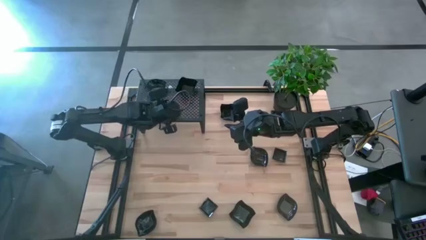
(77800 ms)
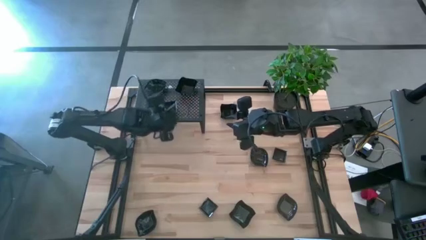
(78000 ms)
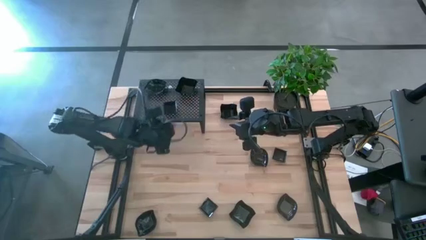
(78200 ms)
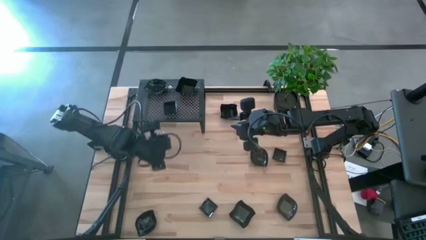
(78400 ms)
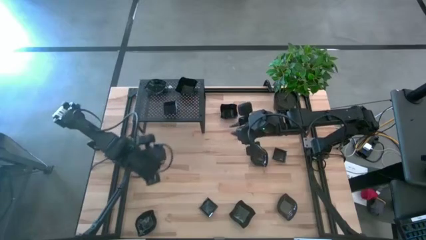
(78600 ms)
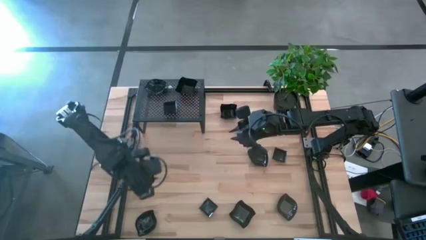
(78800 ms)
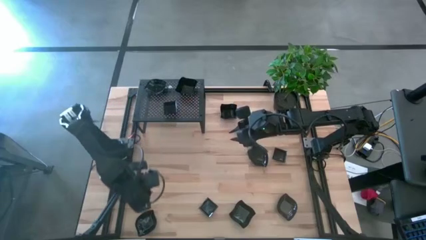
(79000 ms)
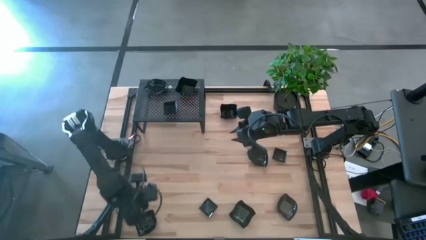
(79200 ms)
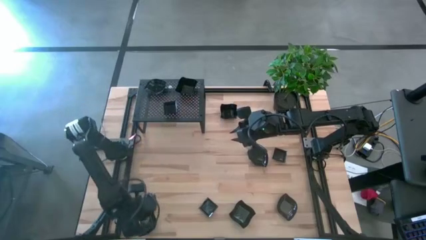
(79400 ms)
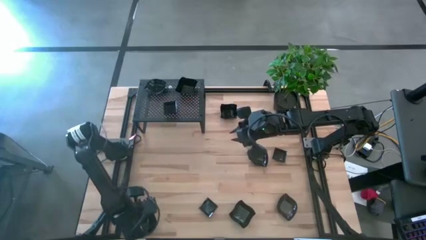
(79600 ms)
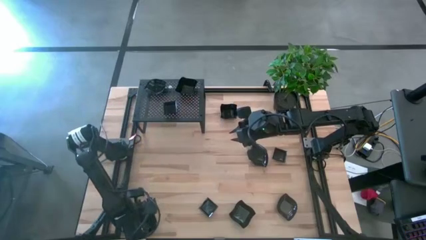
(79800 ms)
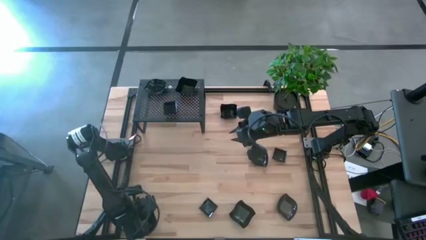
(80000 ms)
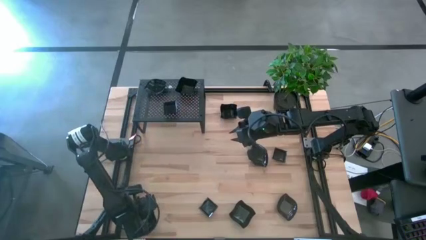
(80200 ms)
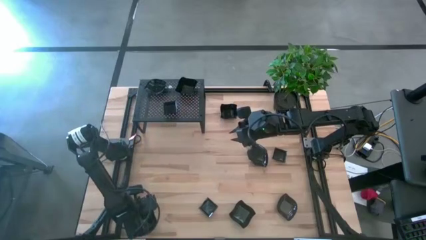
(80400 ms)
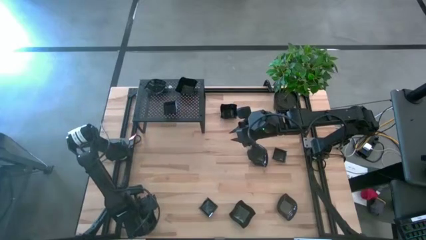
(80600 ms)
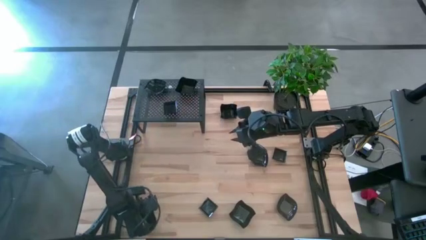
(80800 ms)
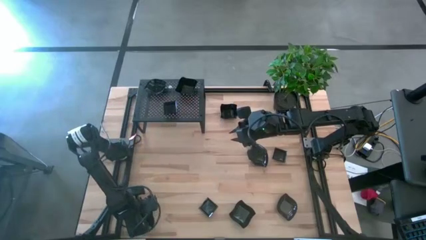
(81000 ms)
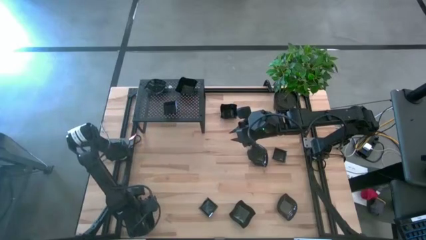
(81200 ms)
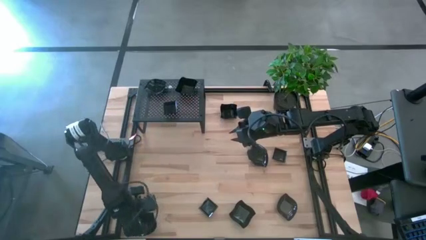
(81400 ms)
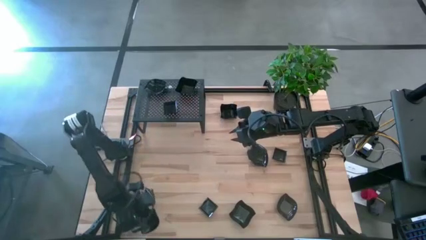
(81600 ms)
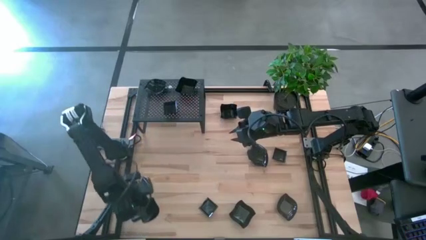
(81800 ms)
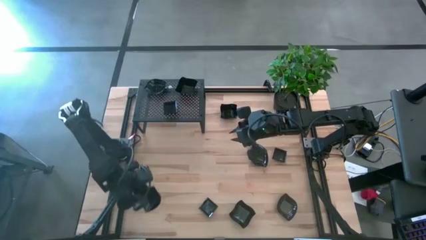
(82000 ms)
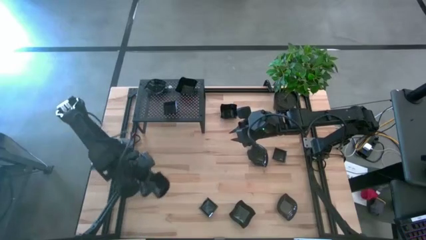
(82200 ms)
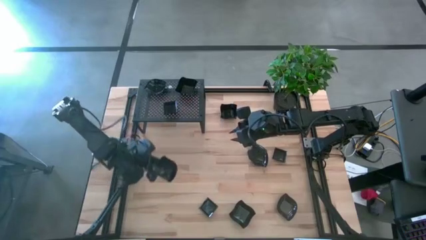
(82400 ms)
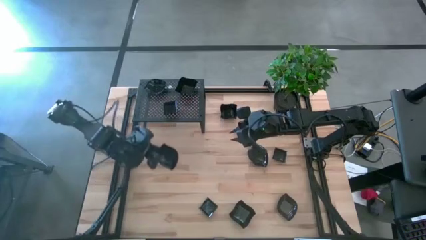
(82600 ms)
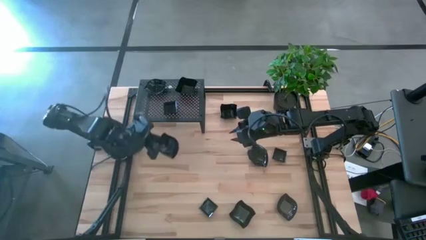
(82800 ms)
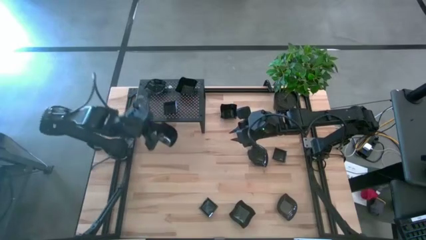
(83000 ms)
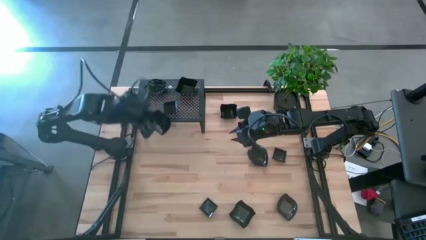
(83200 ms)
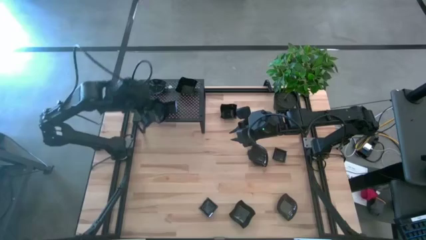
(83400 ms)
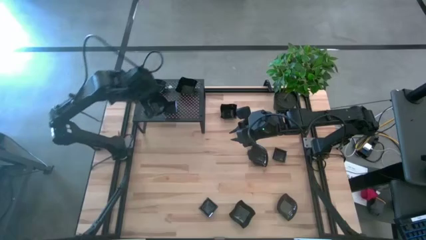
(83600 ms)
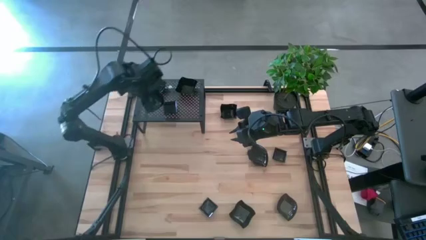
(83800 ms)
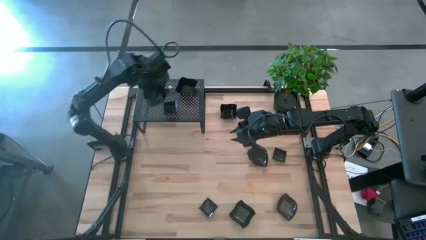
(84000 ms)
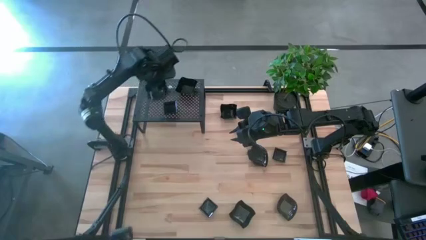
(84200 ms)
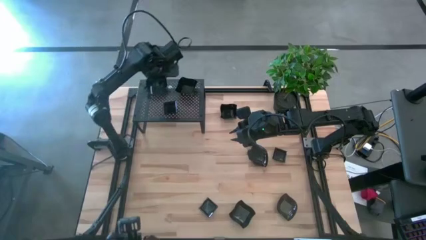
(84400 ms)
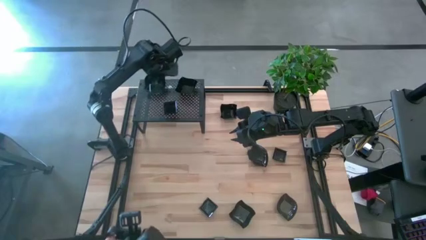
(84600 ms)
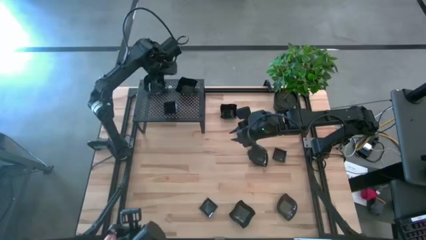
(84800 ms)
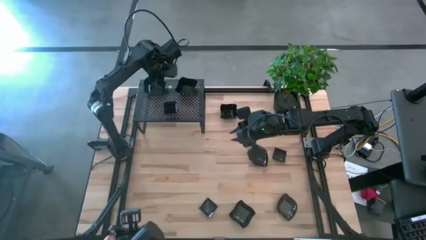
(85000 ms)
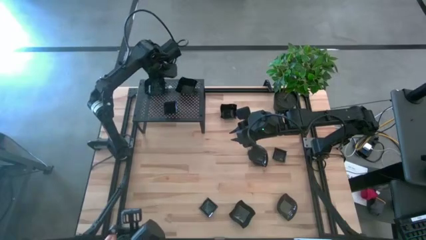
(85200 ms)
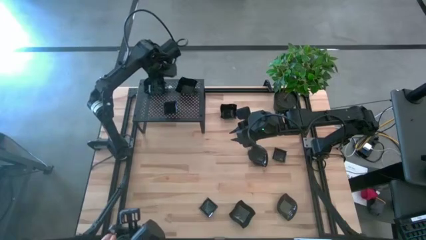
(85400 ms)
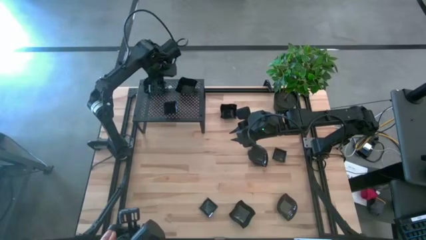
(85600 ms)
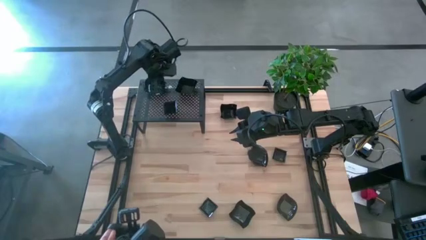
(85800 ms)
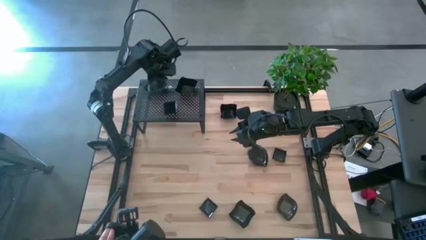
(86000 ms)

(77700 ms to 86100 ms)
Task: Pick & Place Mini shaped plates
Stack the leaf shaped plate on top of the leaf shaped plate on the shelf

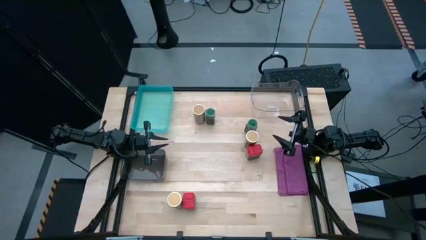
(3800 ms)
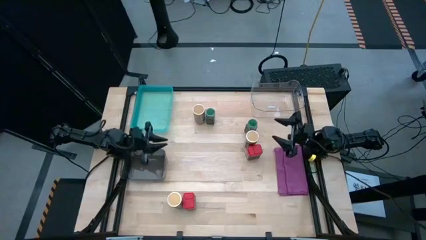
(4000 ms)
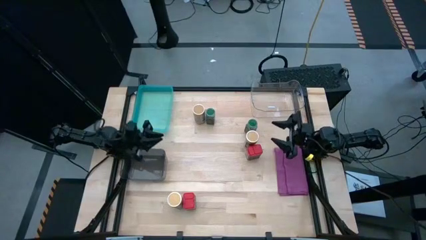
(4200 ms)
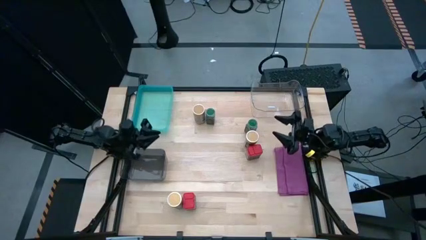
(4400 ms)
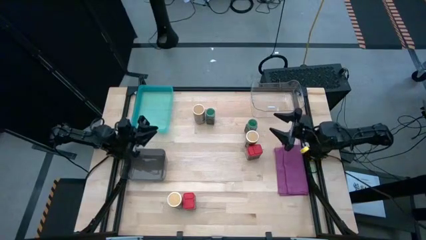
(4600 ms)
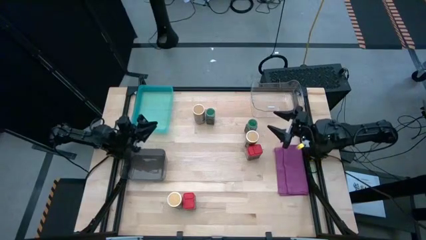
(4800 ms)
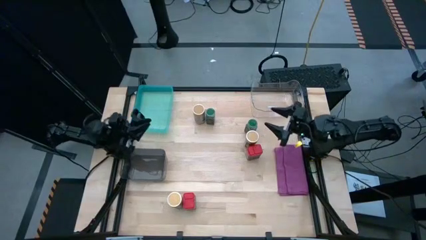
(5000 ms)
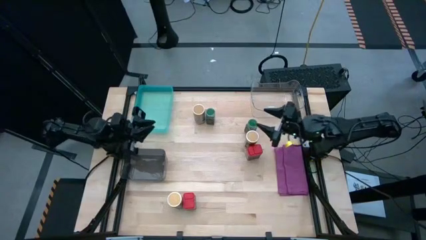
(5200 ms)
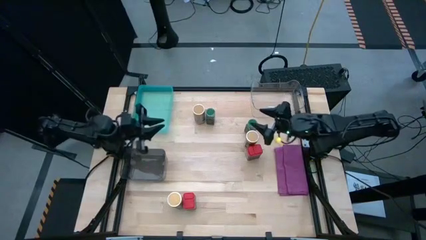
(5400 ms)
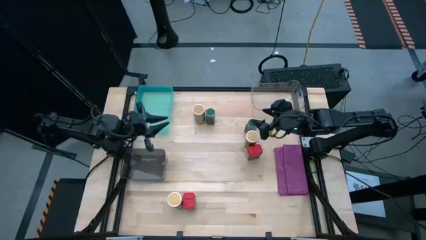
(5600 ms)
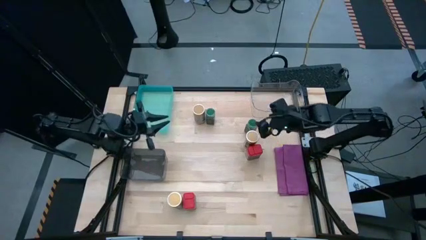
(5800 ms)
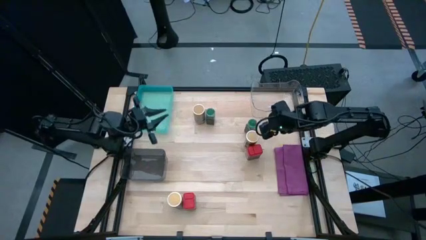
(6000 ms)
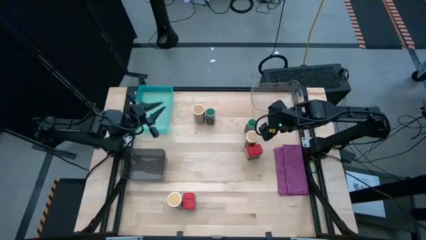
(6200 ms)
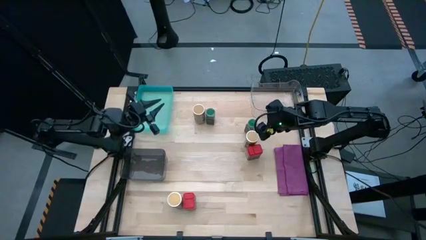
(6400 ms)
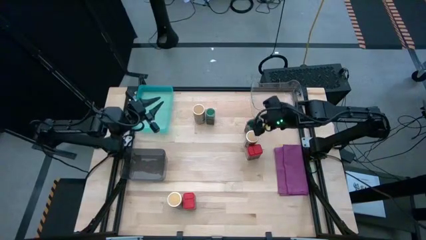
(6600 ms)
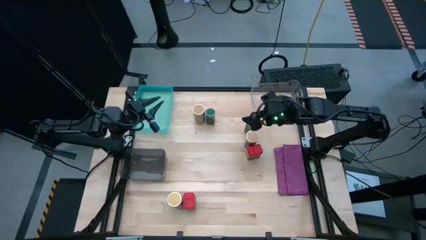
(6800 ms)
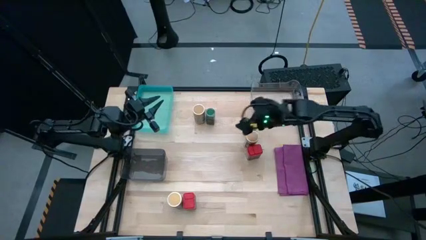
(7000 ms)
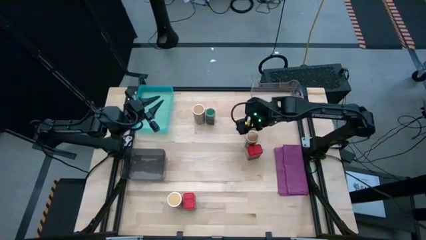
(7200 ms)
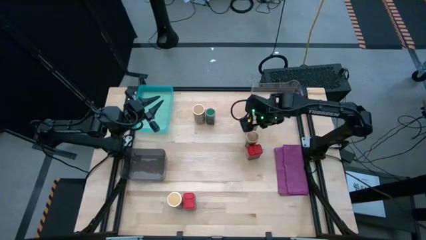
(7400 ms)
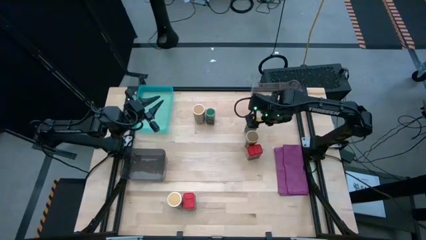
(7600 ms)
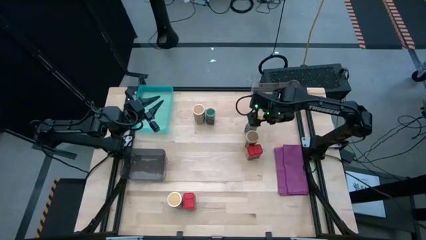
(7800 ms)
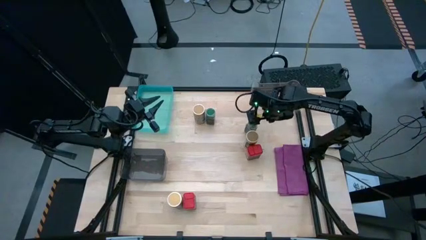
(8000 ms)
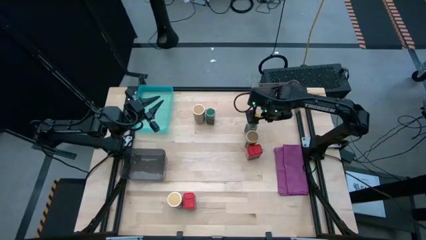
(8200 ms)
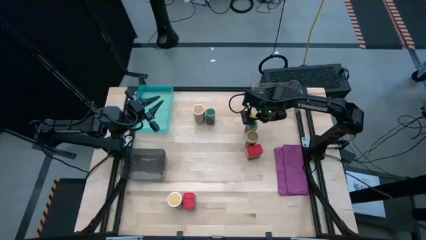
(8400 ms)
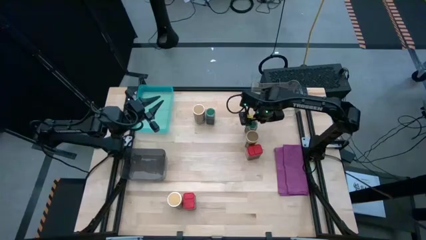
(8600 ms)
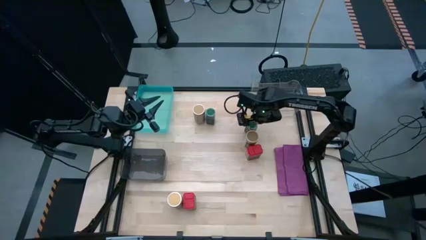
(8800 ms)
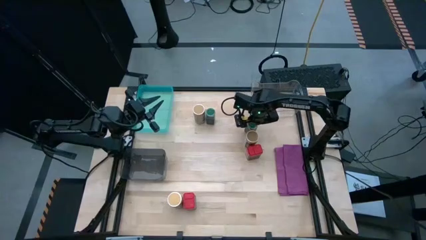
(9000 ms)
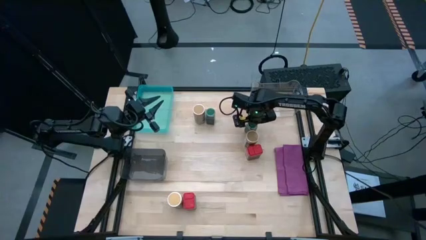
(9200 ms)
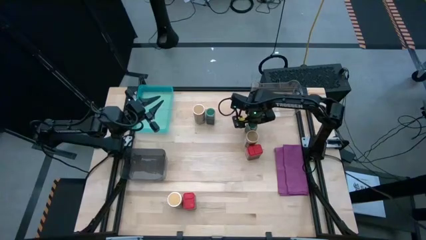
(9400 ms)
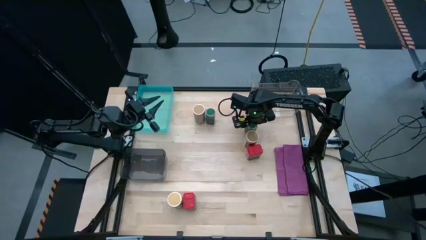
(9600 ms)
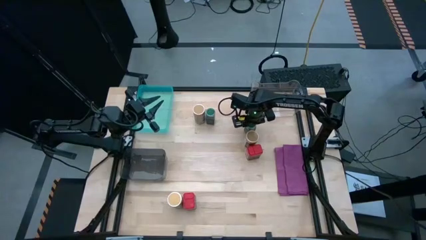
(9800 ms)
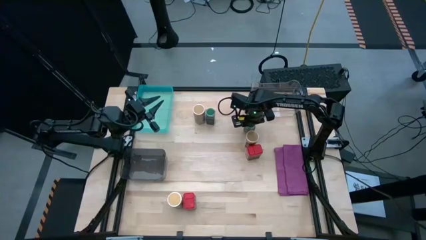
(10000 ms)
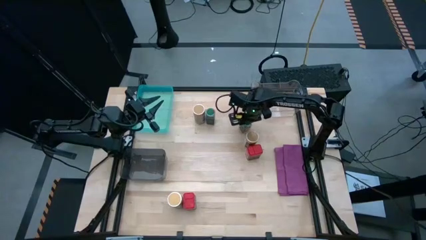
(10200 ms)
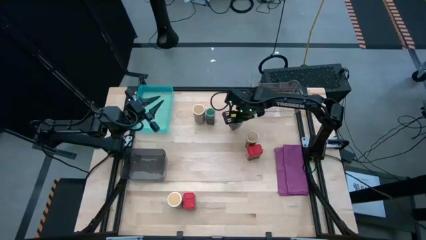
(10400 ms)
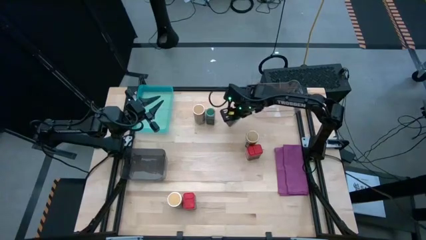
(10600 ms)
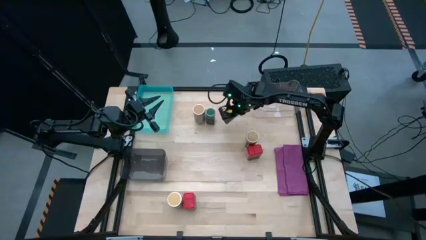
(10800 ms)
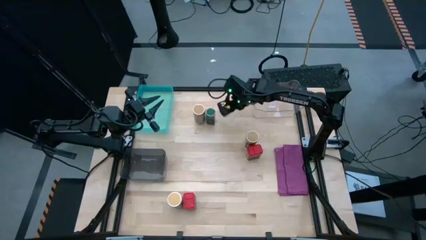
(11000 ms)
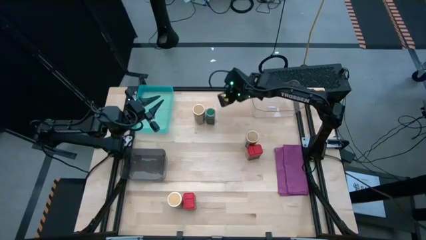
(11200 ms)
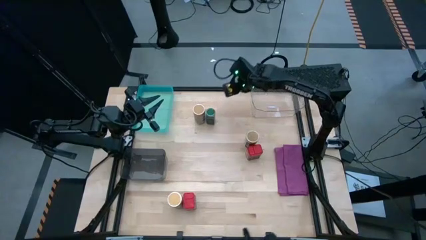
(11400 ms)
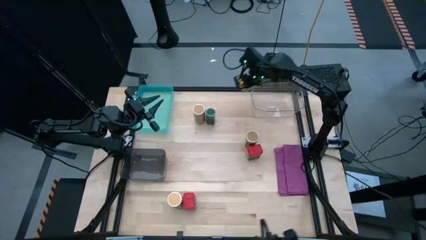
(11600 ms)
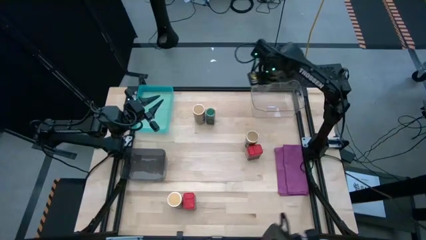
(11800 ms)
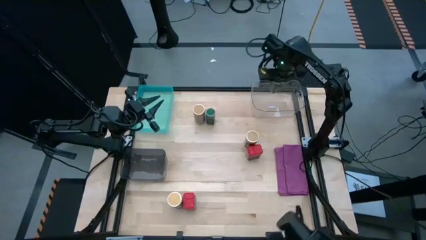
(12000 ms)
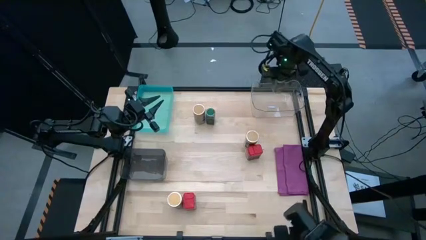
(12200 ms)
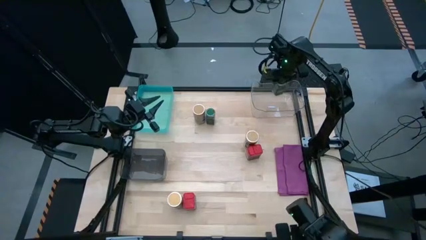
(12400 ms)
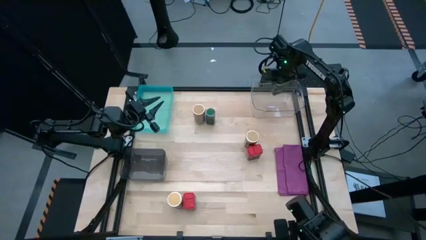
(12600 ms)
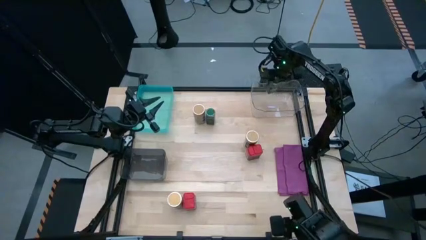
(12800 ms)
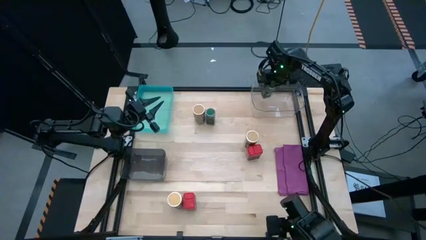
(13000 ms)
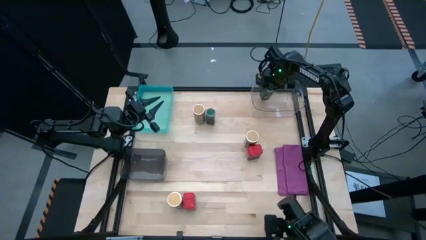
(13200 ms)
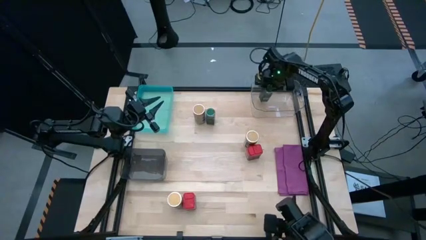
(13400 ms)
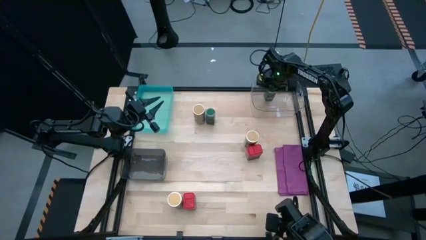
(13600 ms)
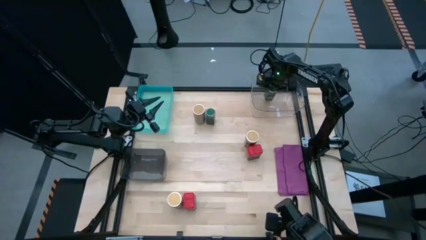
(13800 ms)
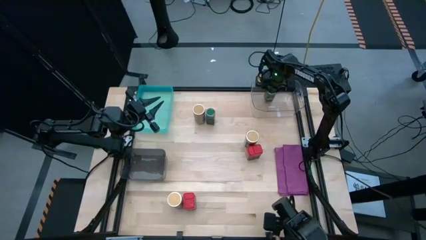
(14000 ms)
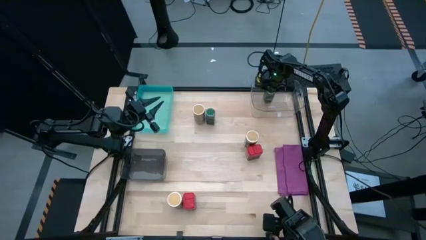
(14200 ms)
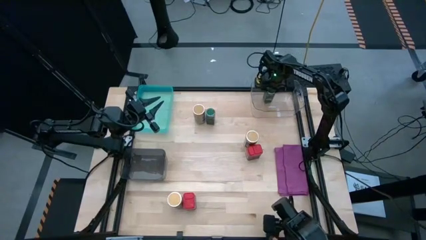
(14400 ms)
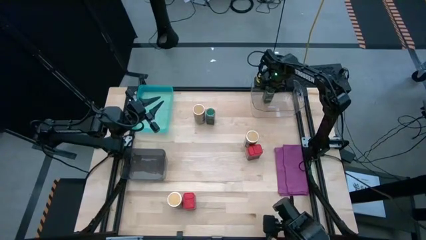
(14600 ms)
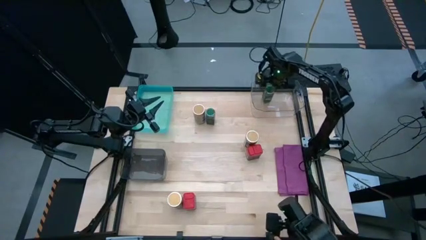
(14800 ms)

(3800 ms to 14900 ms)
Task: Sort spices by type
Put the right green seasoning bottle into the transparent bin
